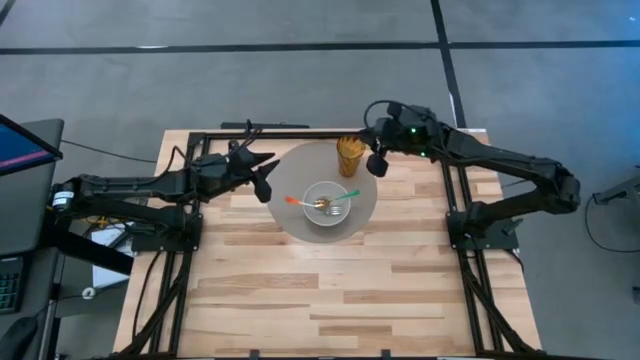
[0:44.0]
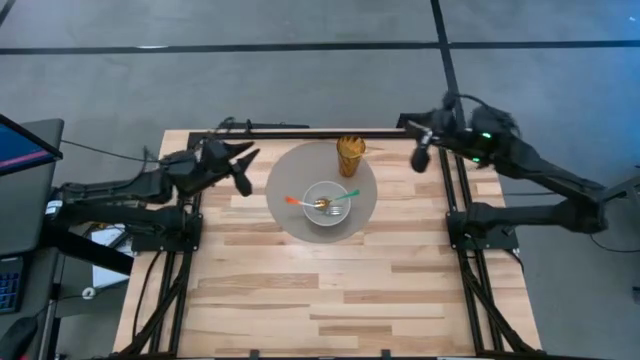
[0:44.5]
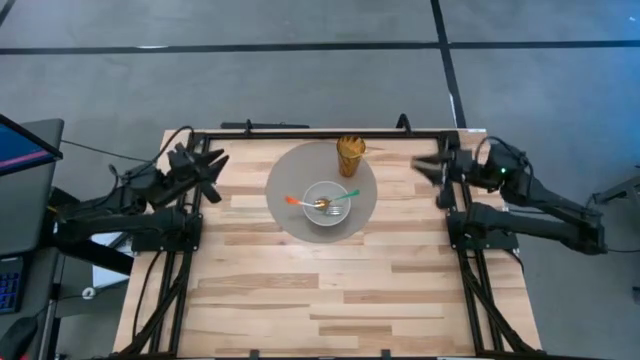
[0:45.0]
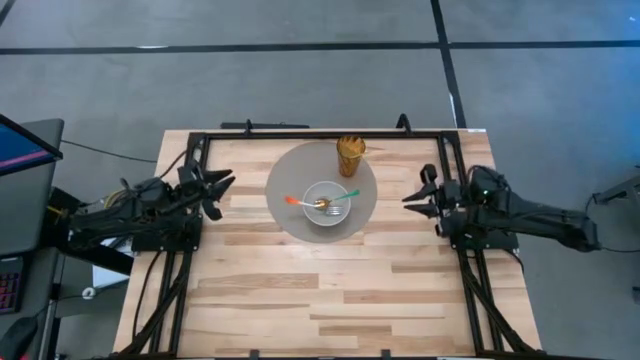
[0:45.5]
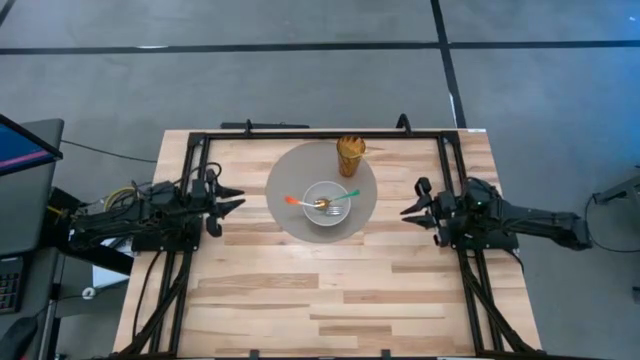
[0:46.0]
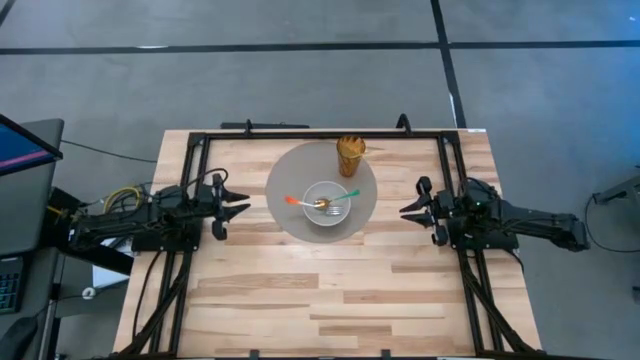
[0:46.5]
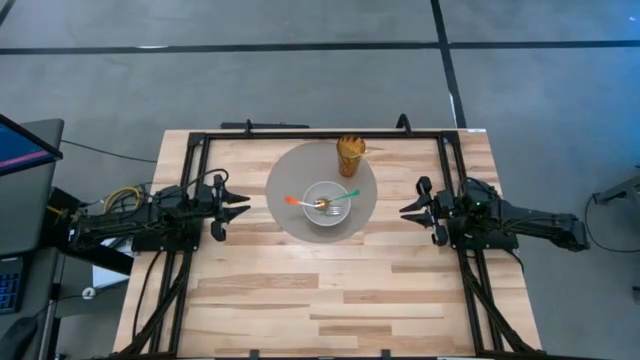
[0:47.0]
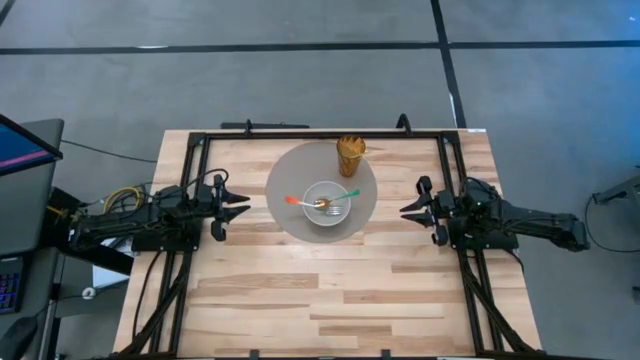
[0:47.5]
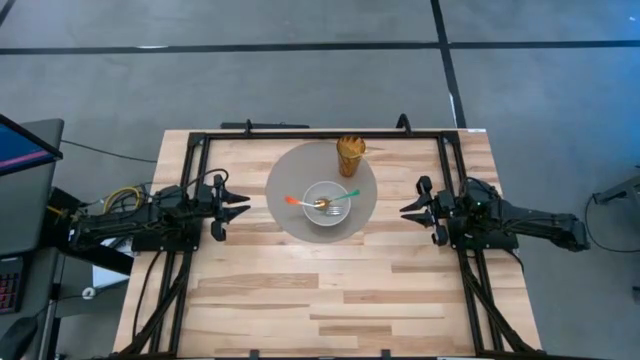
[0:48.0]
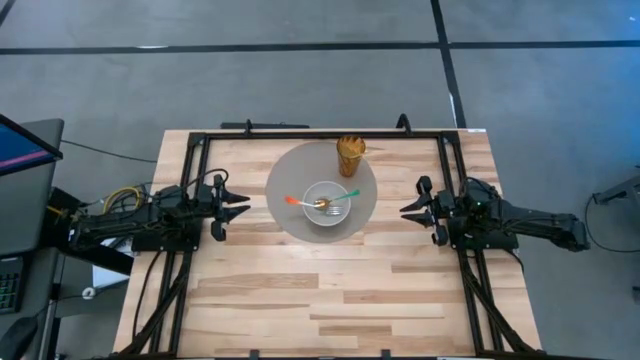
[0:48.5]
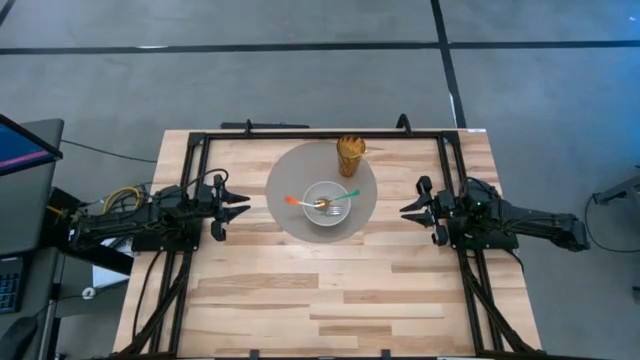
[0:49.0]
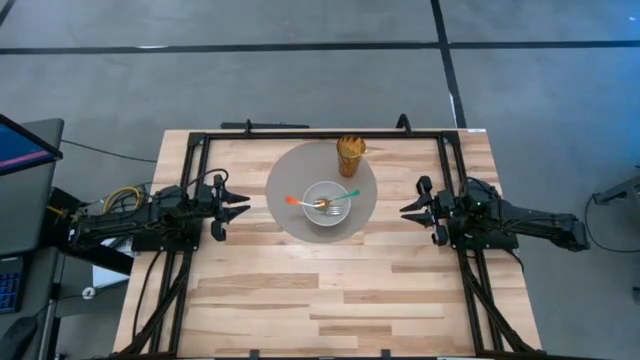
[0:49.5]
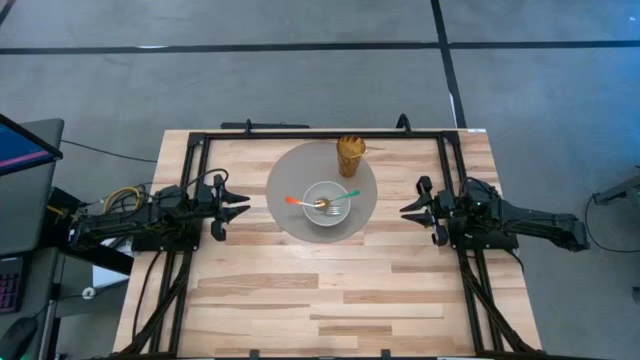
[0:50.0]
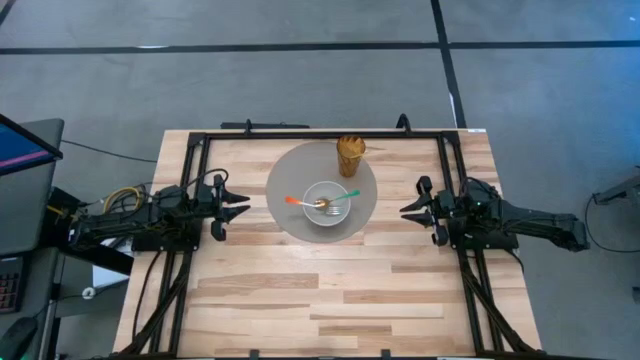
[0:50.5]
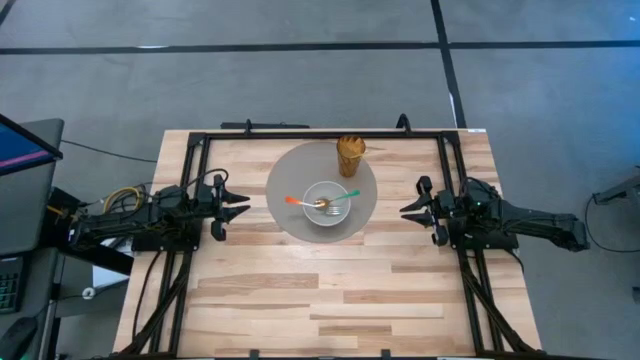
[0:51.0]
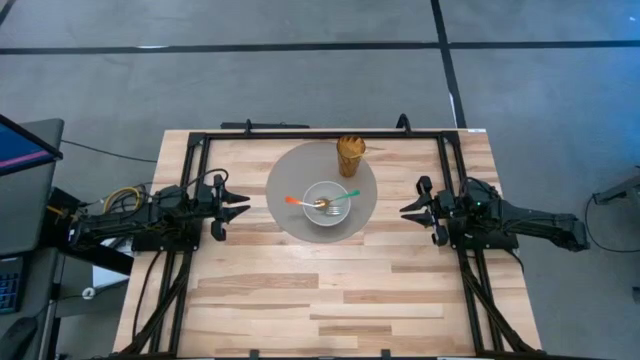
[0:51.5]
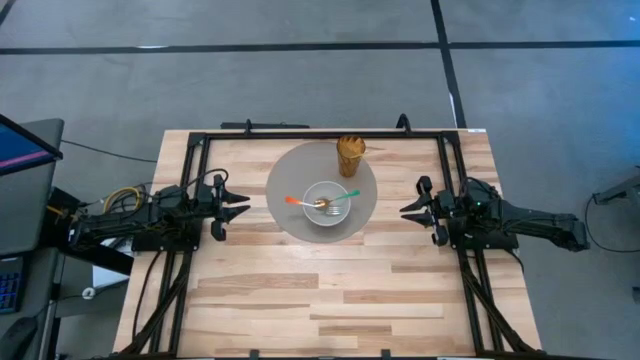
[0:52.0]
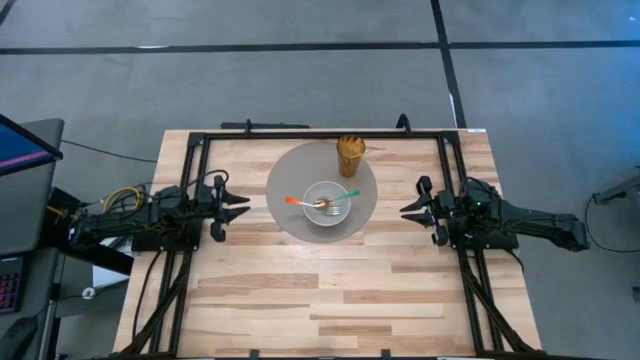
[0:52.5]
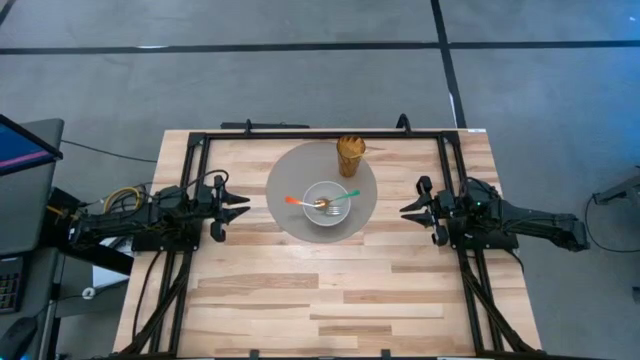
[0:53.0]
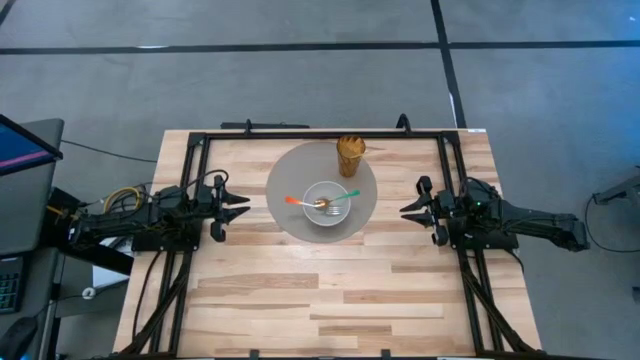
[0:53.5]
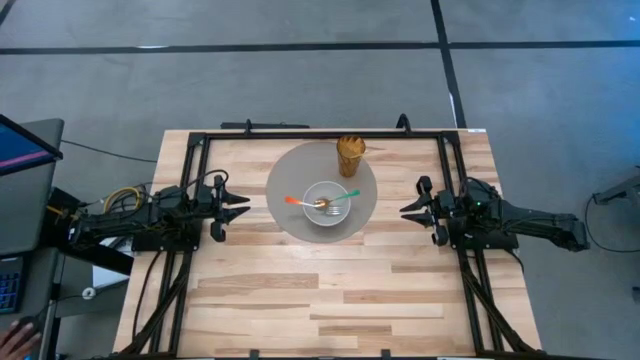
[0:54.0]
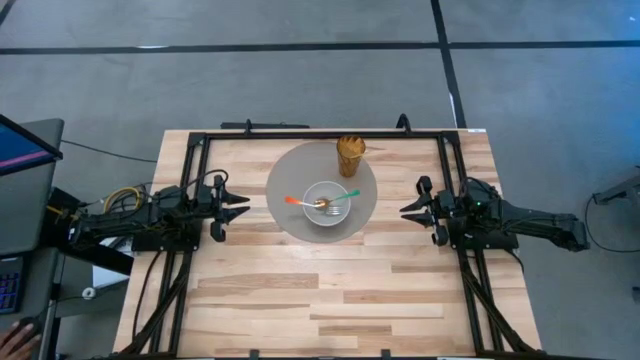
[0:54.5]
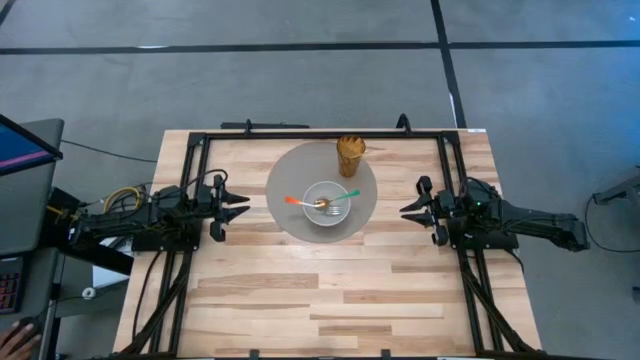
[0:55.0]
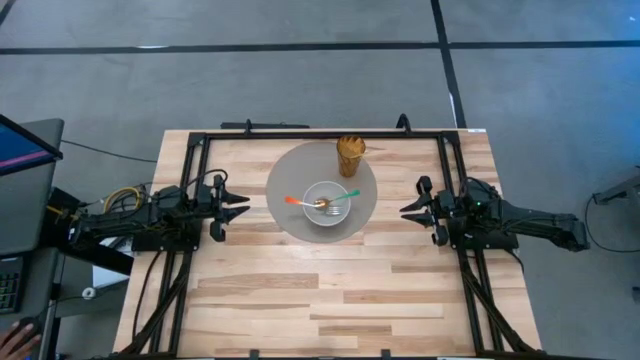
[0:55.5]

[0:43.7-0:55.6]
Task: Pick & Place Utensil
Return to Home Position

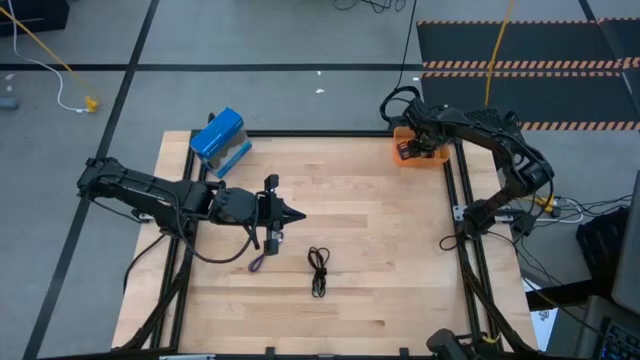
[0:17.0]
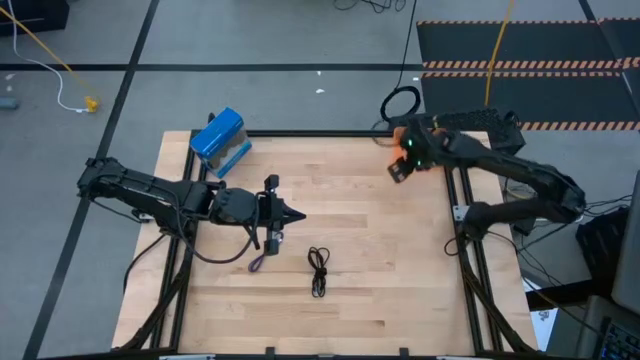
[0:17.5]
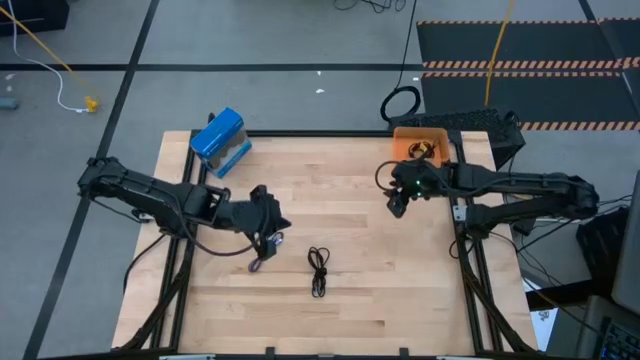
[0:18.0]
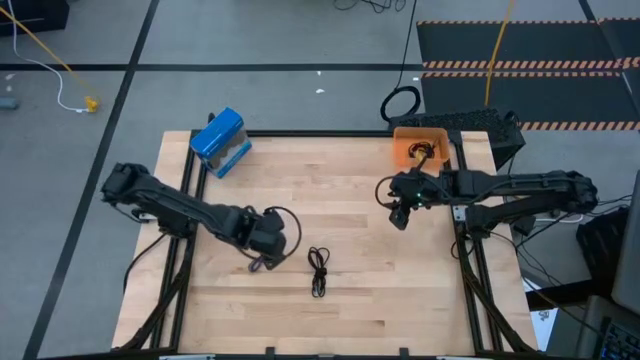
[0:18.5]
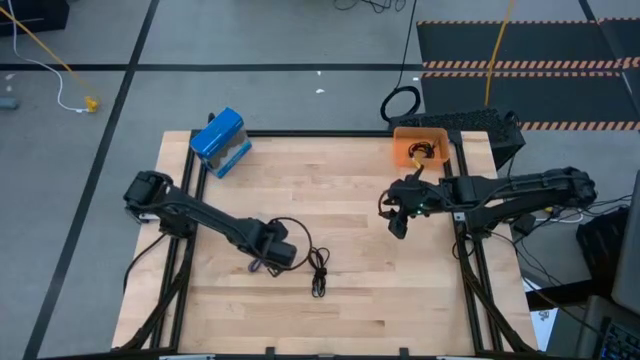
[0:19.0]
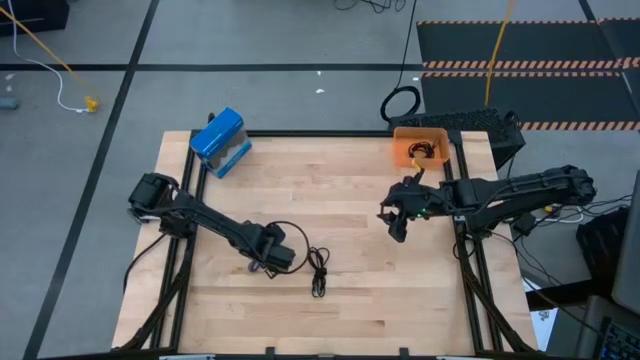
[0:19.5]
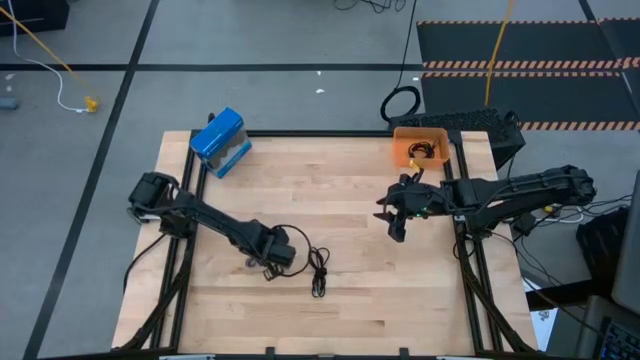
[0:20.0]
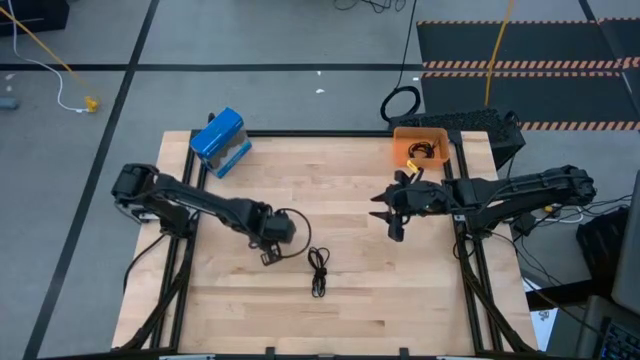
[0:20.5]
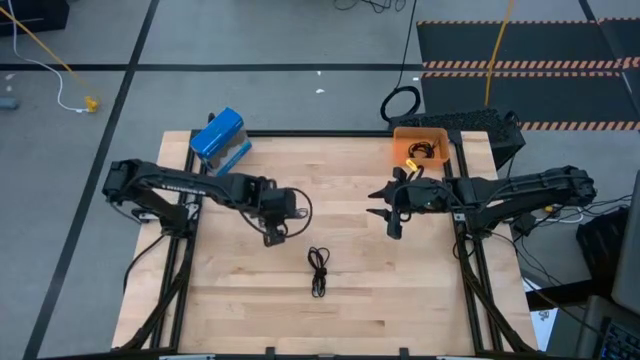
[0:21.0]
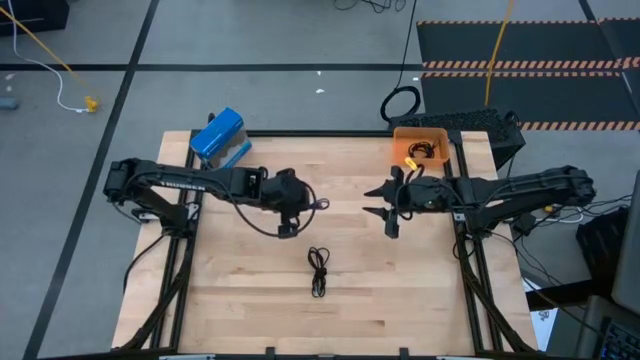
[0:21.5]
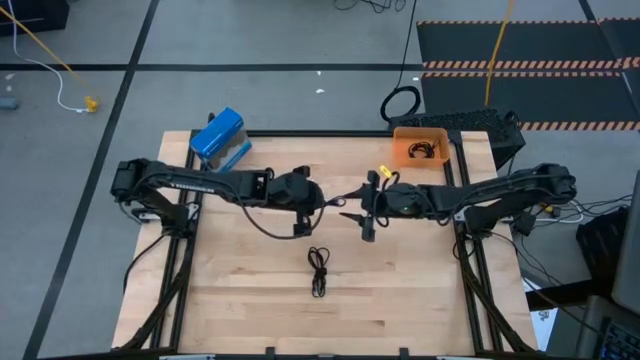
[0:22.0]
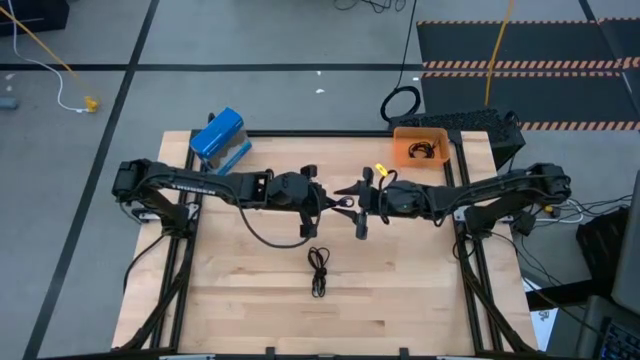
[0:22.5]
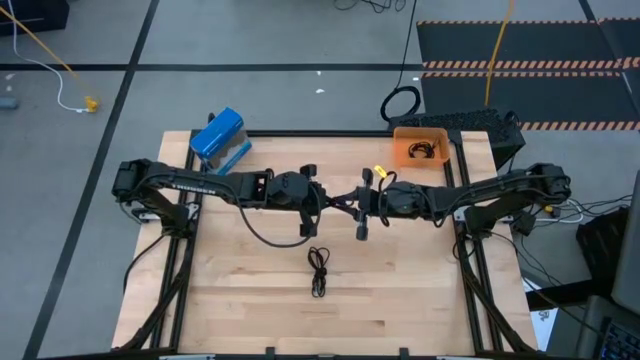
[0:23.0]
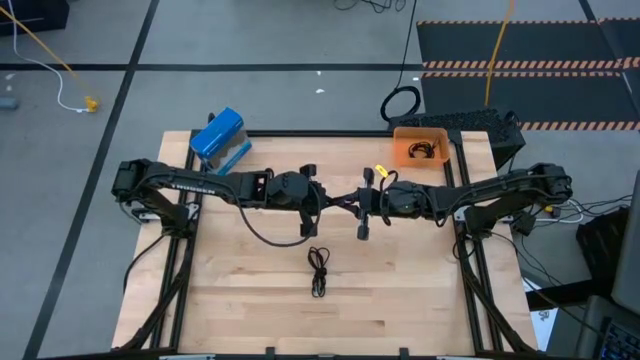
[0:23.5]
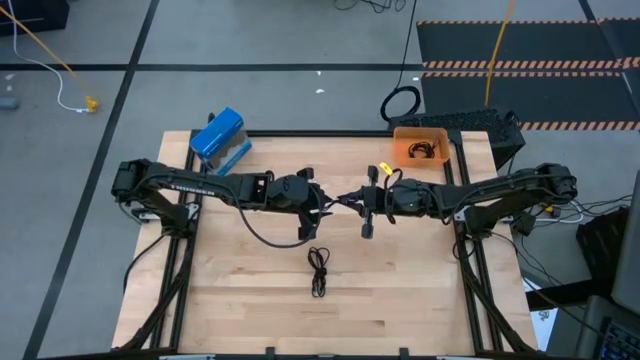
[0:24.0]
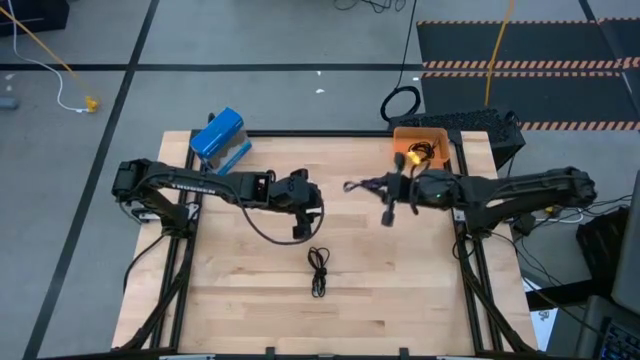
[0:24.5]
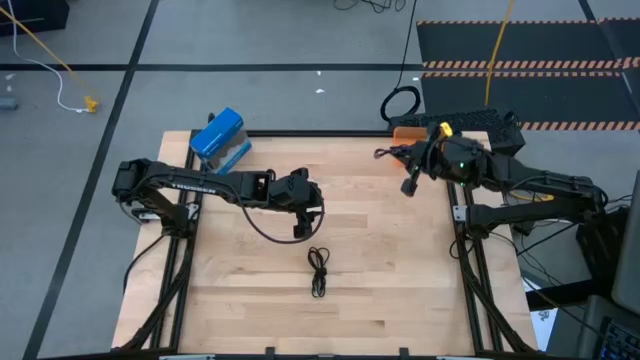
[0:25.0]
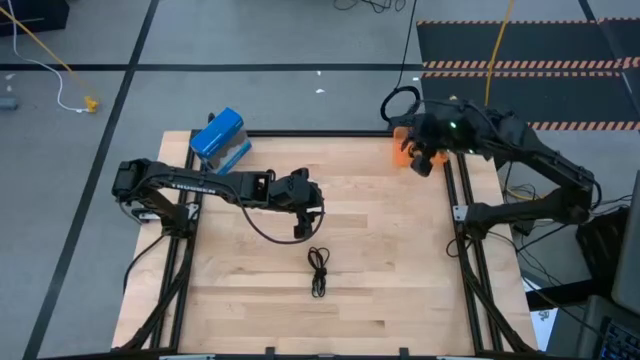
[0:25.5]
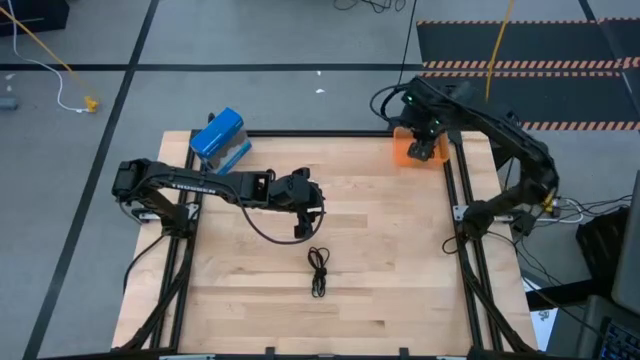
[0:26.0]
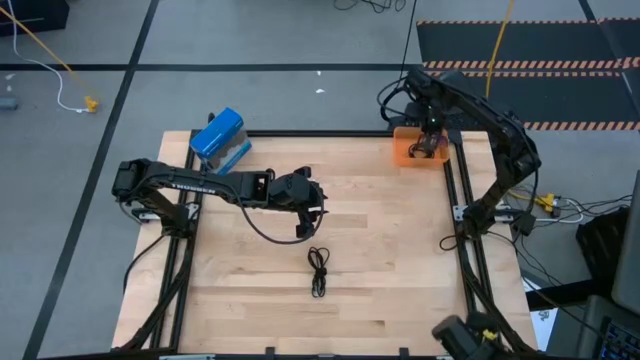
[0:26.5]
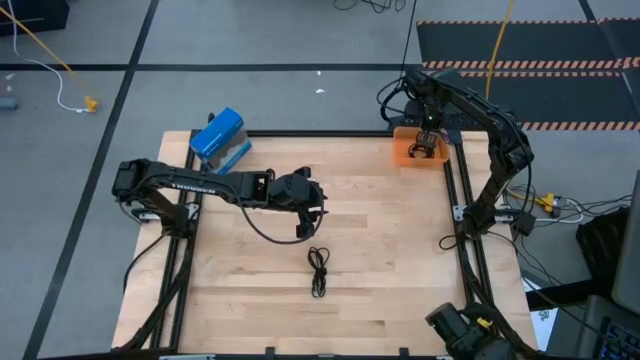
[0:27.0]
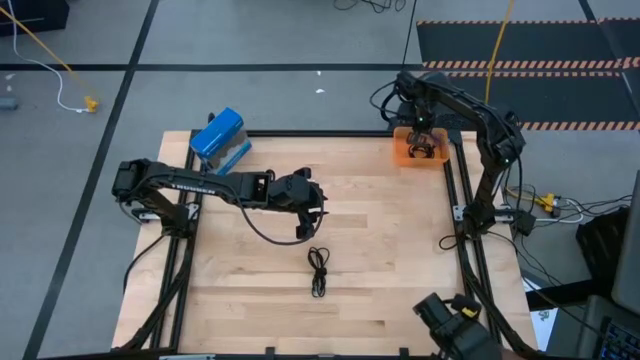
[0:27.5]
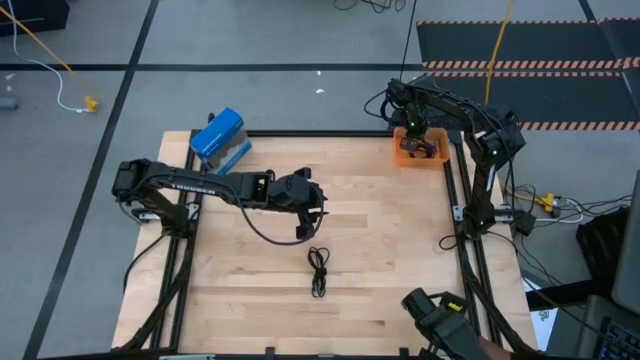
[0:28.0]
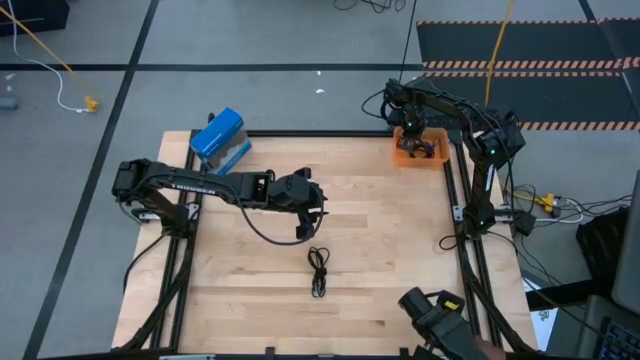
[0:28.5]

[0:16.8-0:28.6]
Task: Pick and place USB-C Cables
Put the blue charger cable into the orange bin
